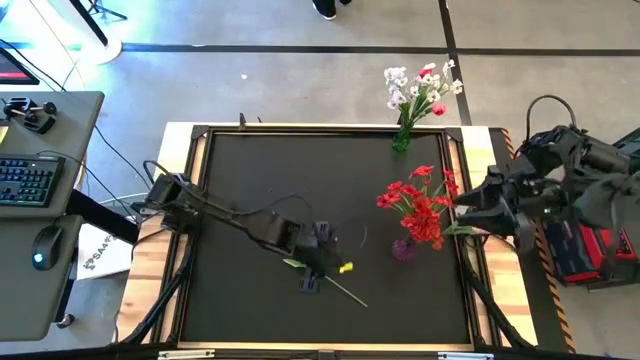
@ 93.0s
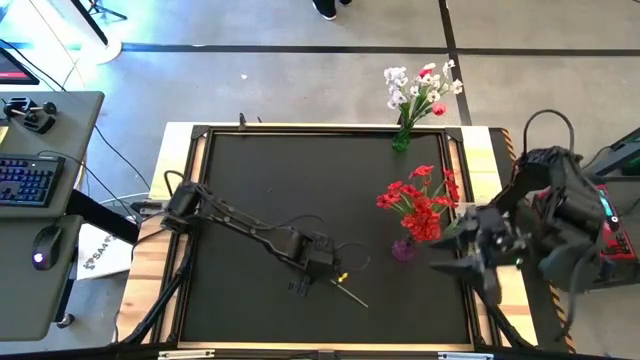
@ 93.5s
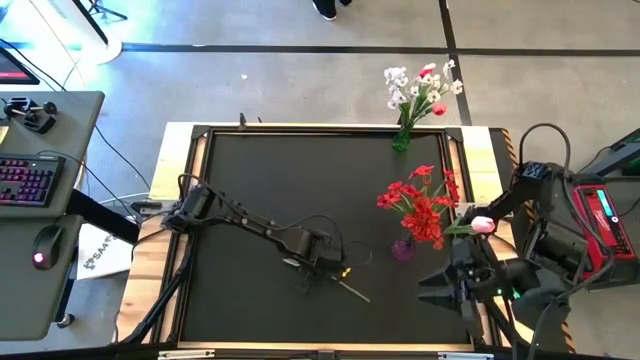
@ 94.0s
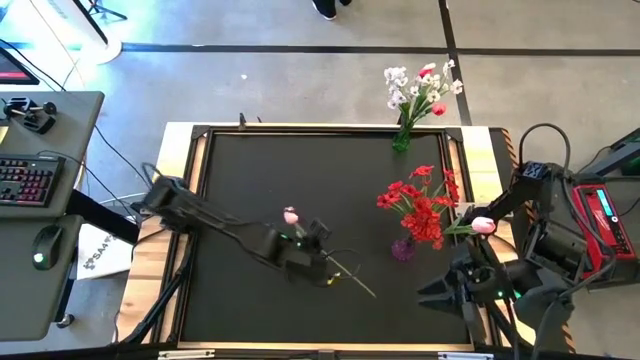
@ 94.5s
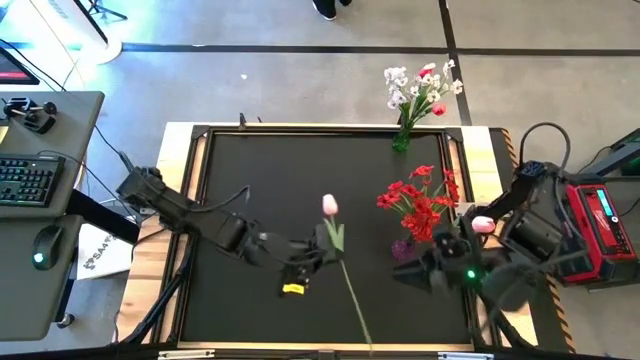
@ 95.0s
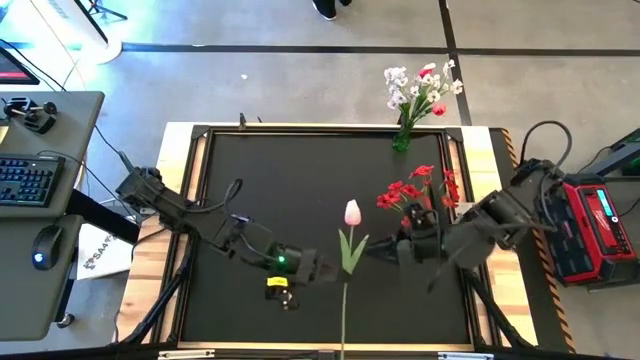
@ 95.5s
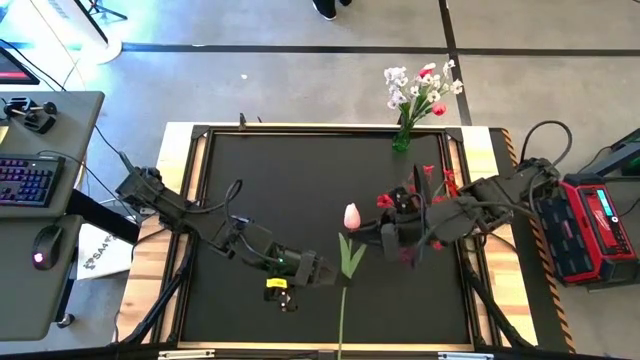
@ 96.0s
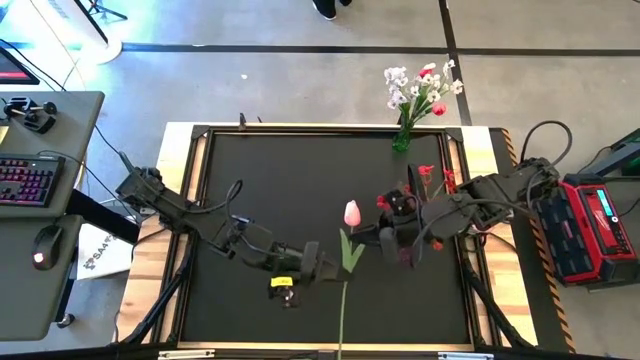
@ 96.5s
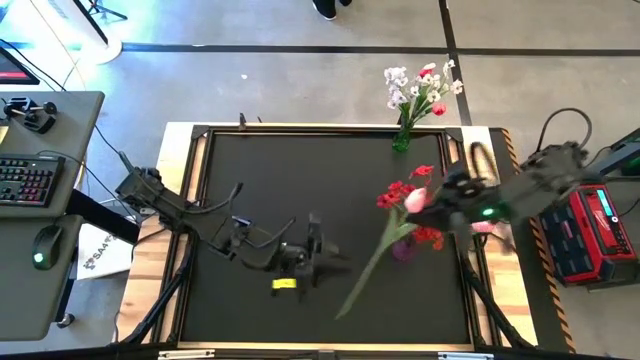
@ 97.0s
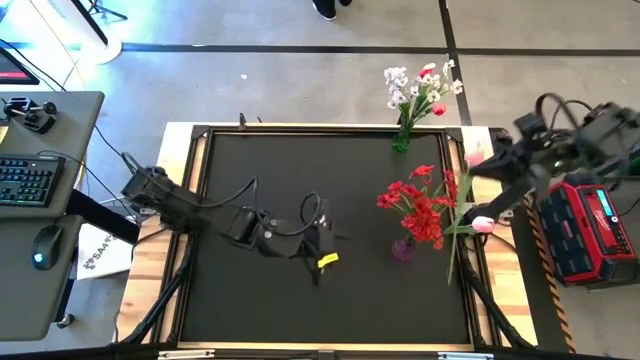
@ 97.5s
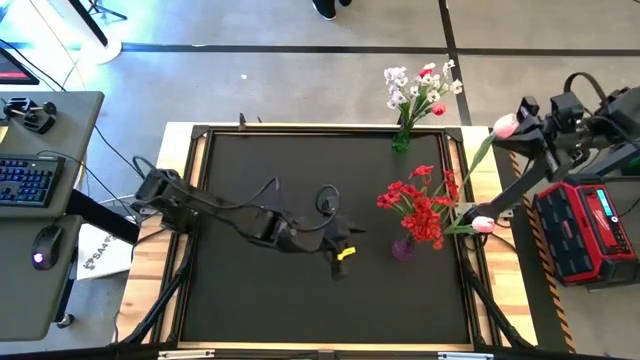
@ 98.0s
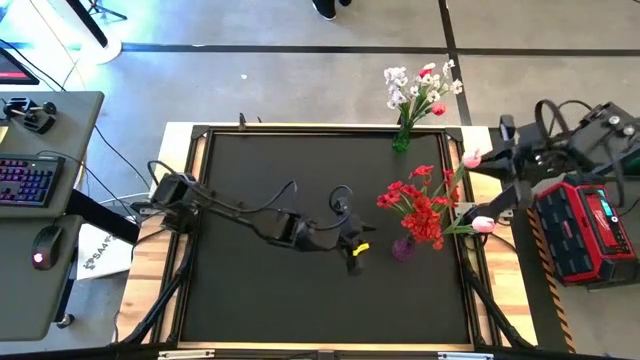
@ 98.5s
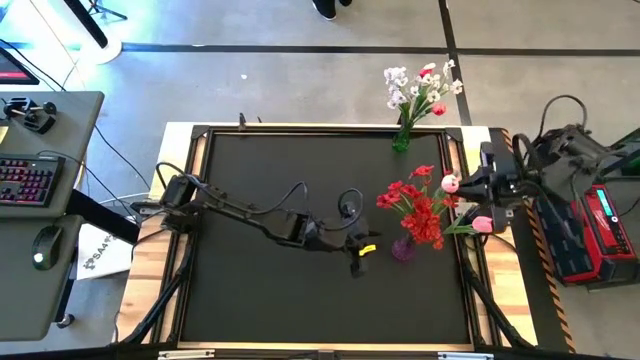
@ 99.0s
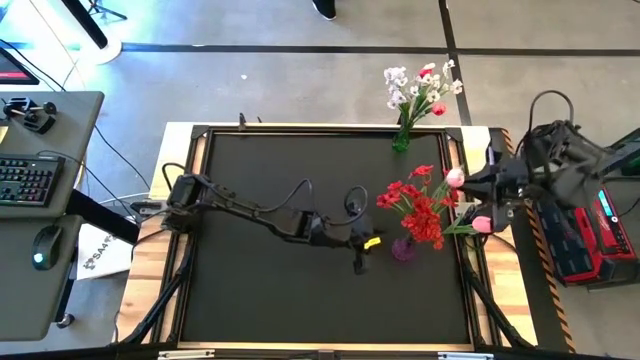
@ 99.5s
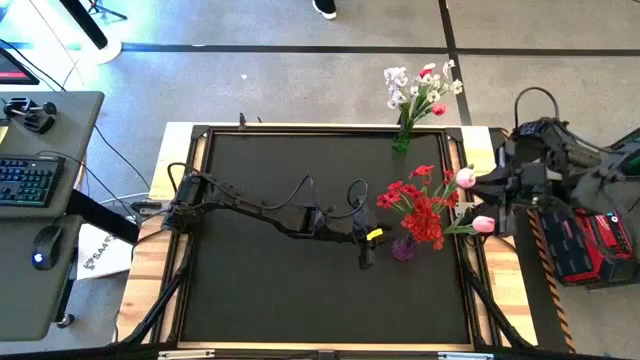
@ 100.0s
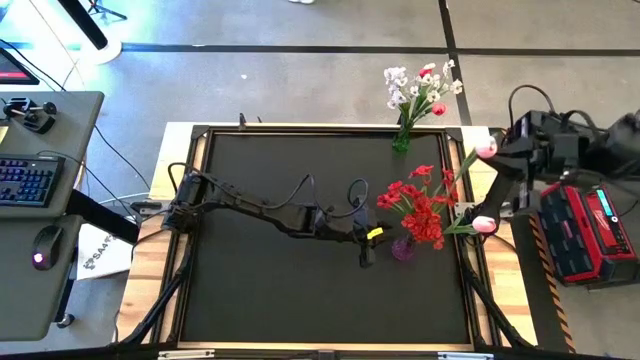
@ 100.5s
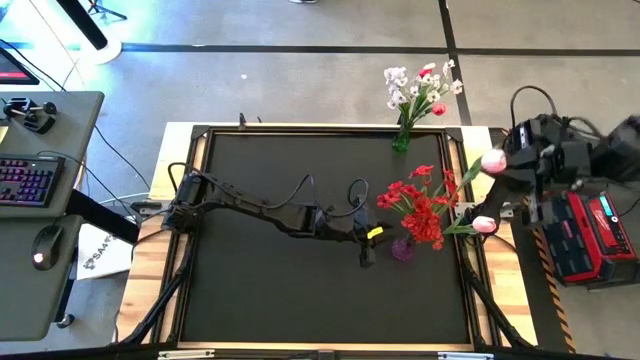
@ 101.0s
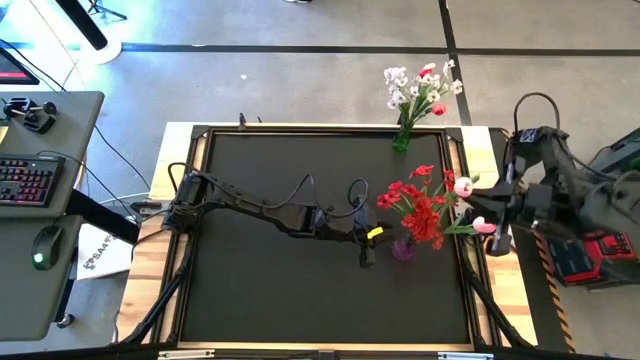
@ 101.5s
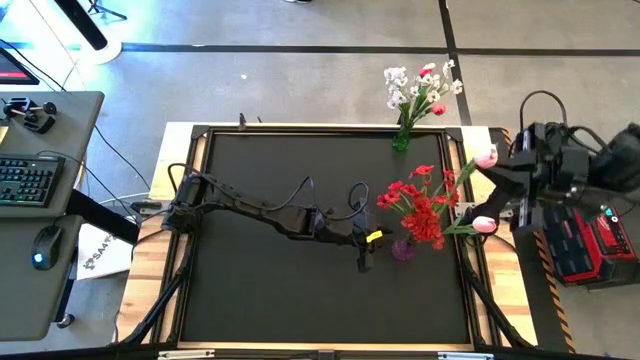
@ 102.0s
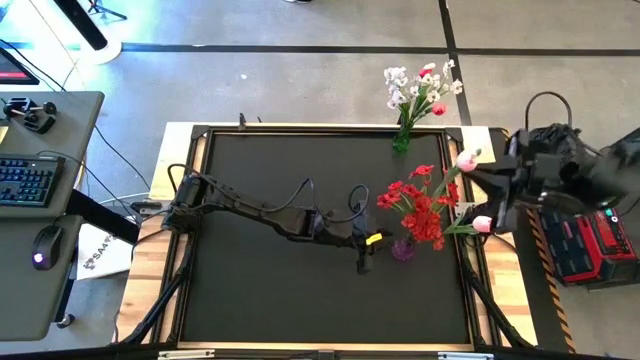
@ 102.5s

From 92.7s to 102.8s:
Task: Sort flowers into vase by color
Put the pink tulip into the violet vase

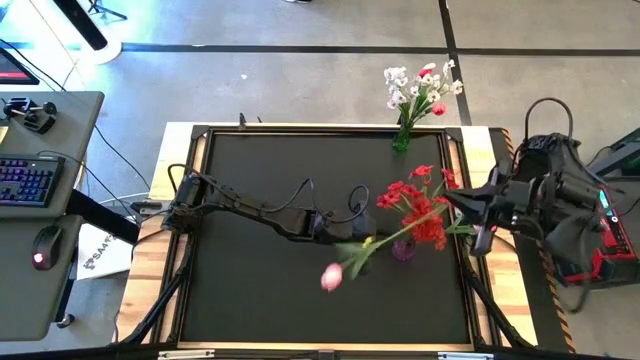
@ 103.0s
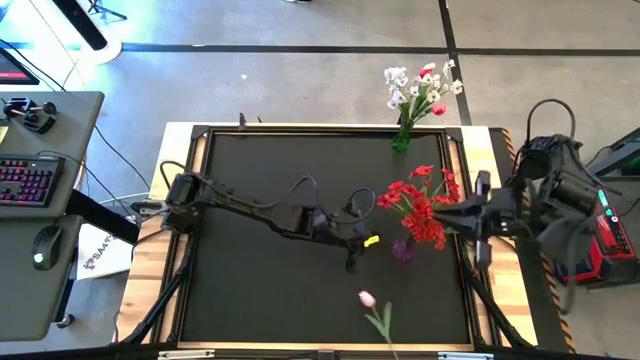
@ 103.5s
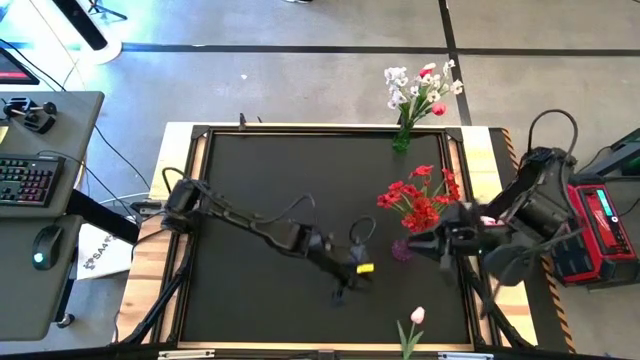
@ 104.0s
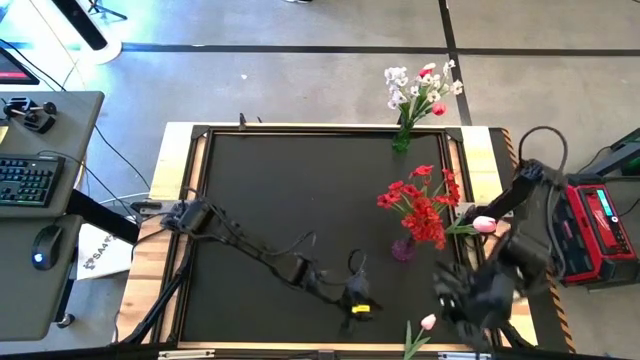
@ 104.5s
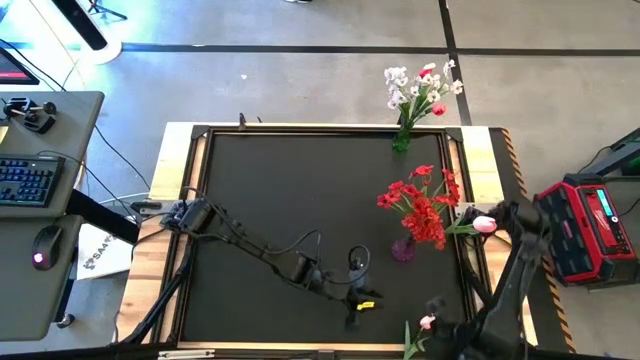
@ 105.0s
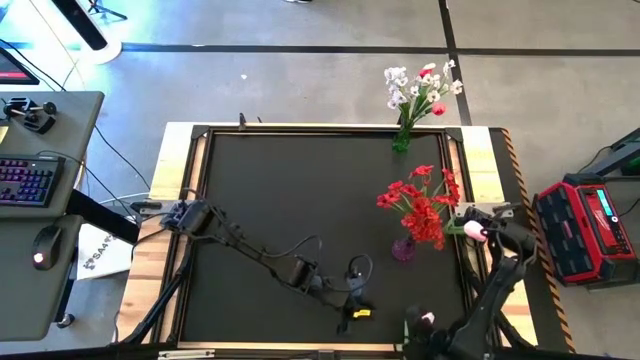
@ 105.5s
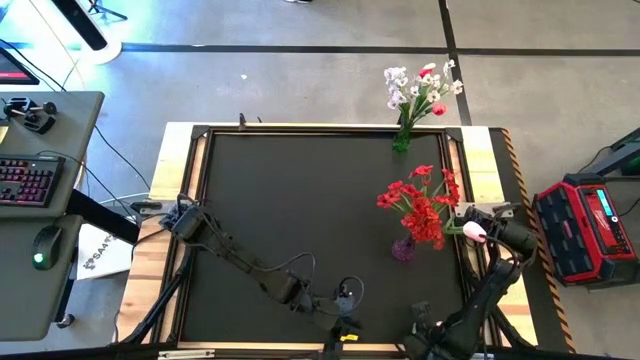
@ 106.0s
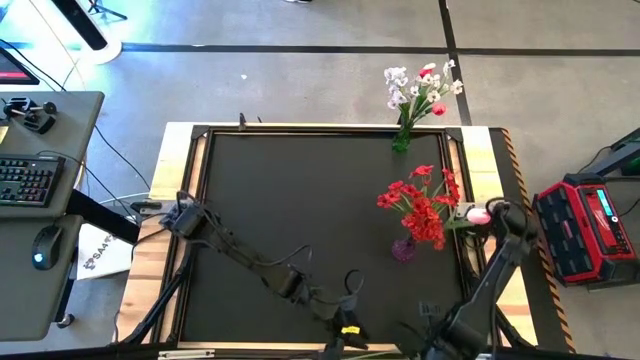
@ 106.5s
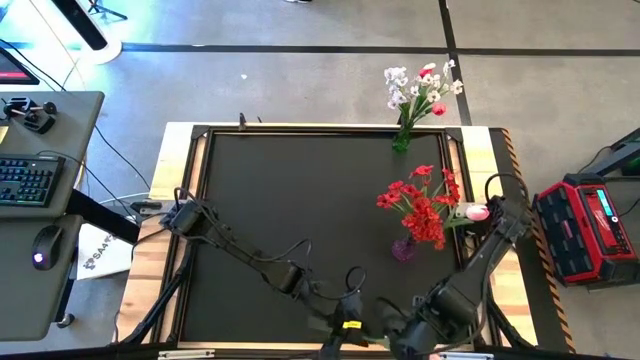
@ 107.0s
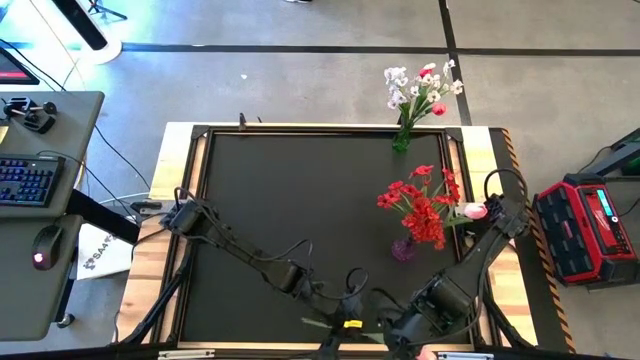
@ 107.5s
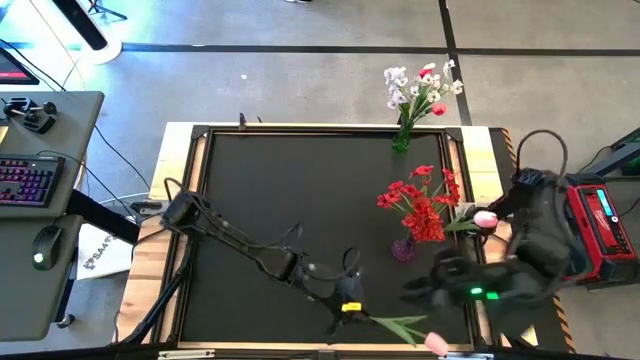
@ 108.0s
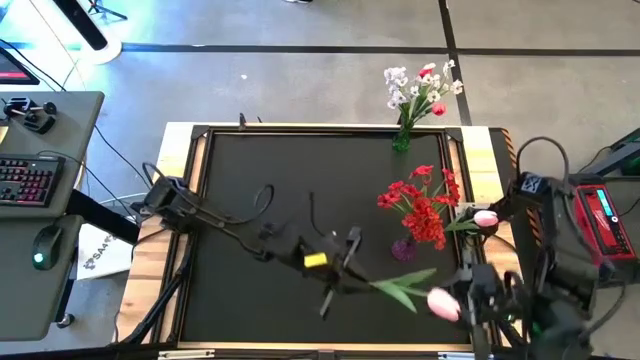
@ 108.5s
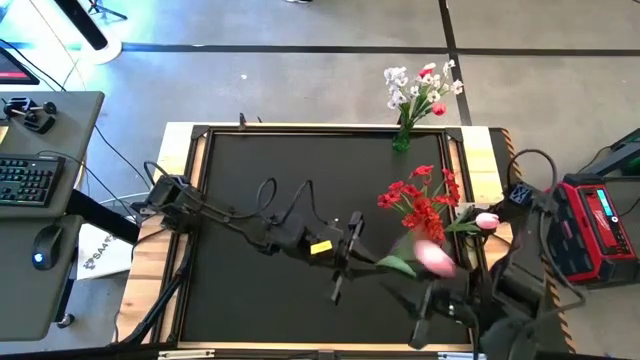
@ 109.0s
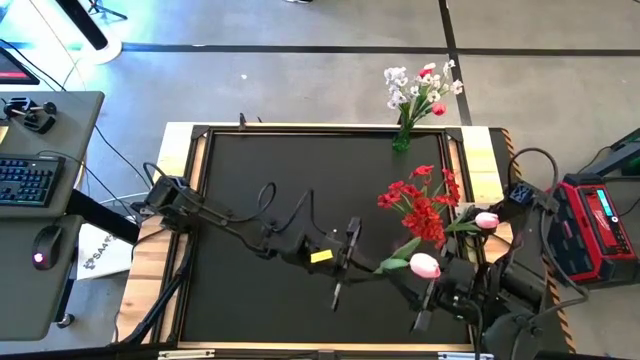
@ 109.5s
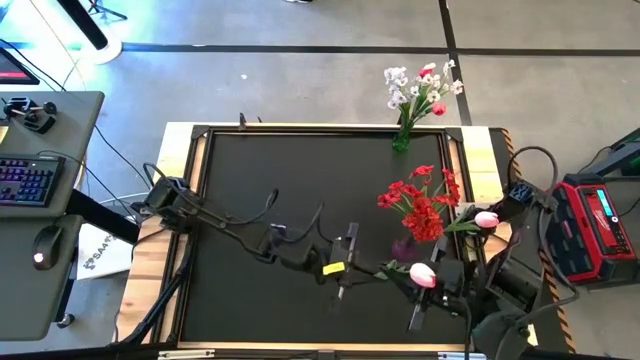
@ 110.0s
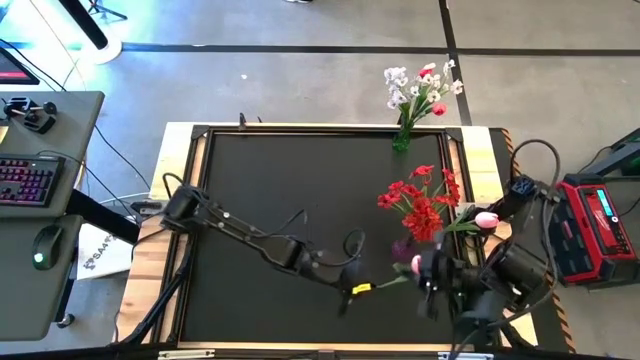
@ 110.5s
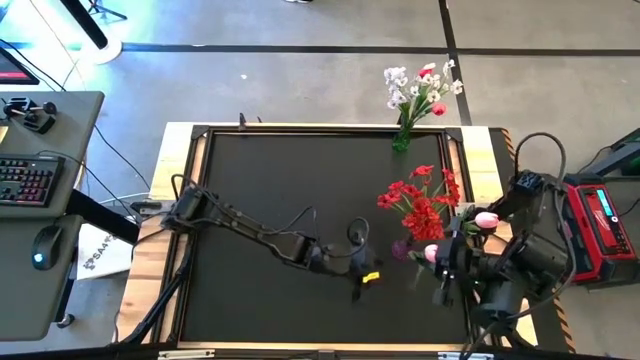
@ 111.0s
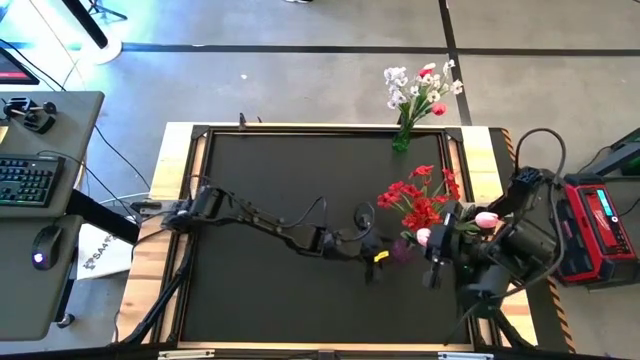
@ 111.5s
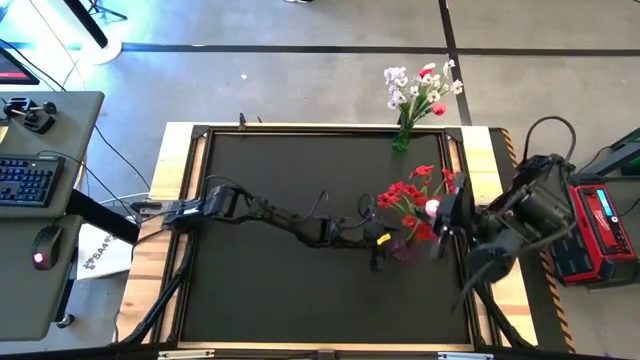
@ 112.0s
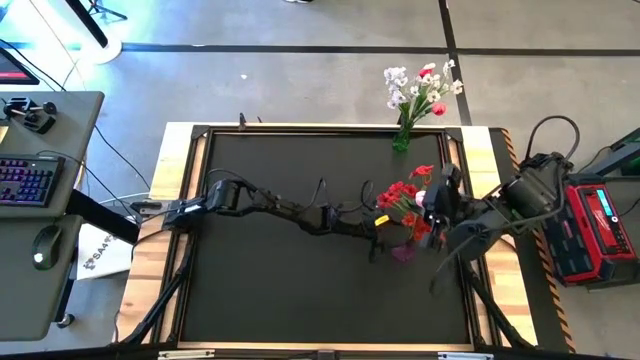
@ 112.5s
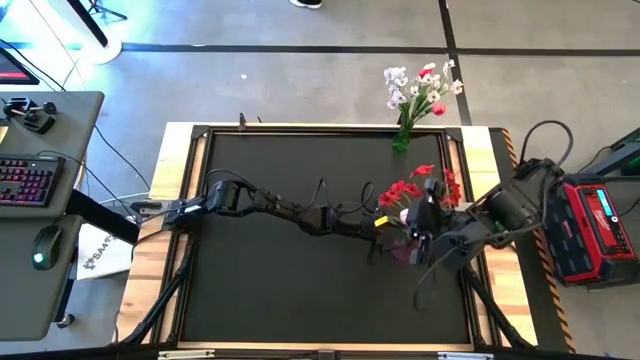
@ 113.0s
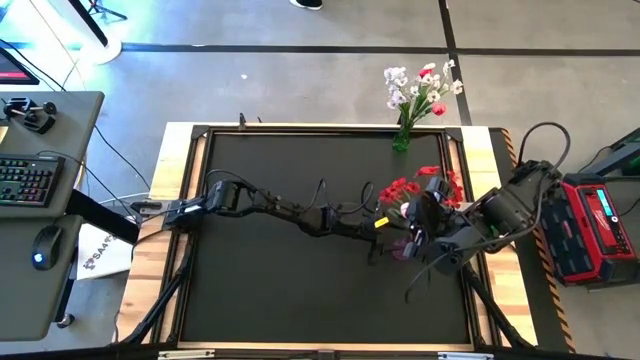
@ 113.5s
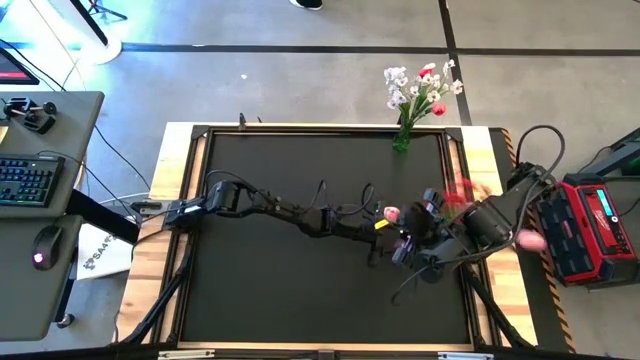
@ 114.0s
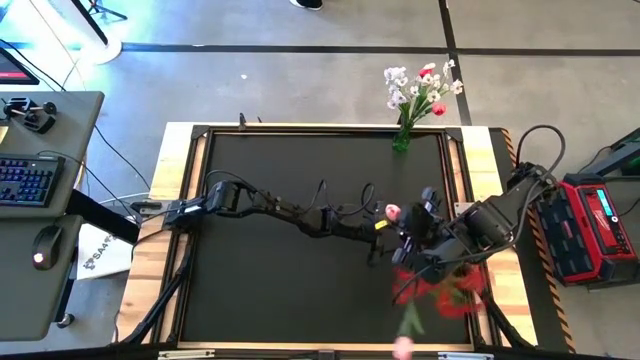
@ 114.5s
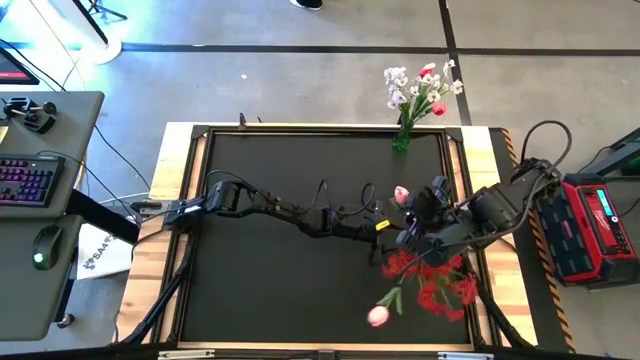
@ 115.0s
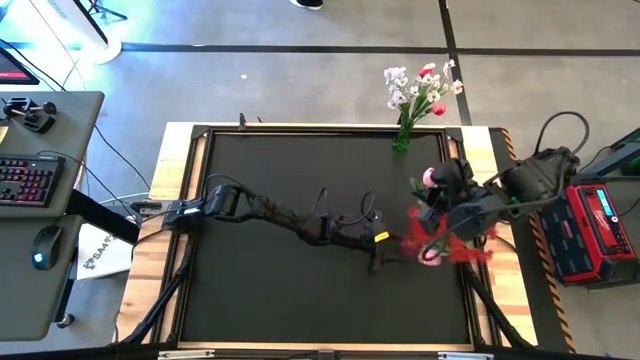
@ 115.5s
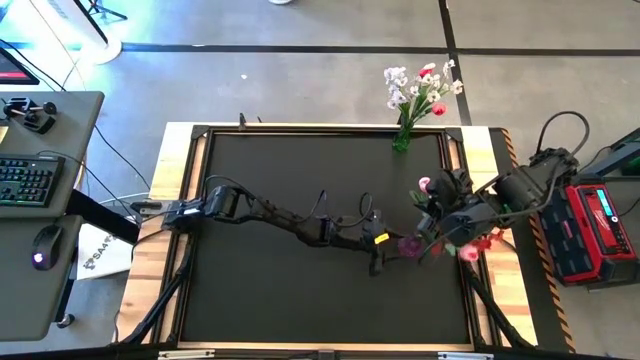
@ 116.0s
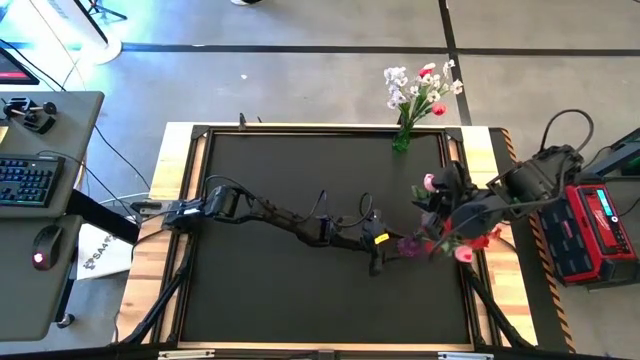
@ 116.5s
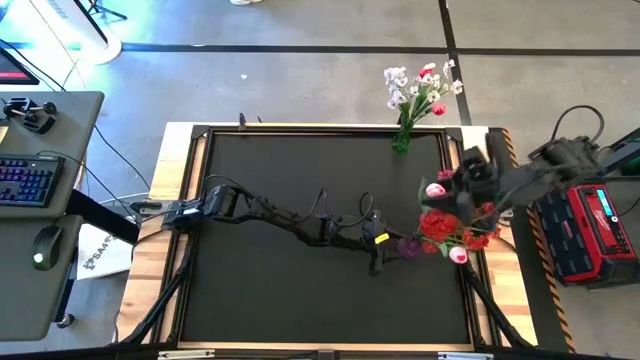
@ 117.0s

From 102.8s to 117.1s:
Put the pink tulip into the violet vase
